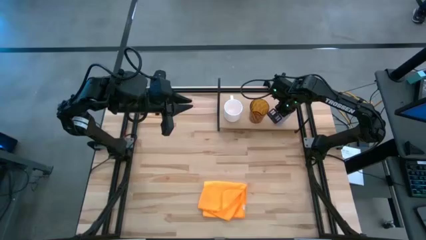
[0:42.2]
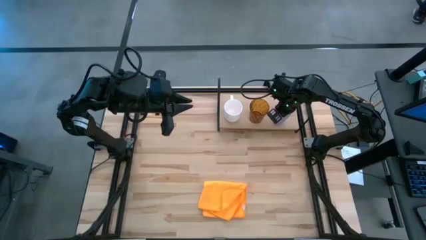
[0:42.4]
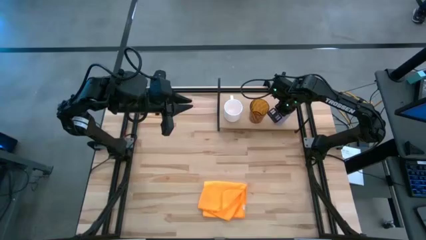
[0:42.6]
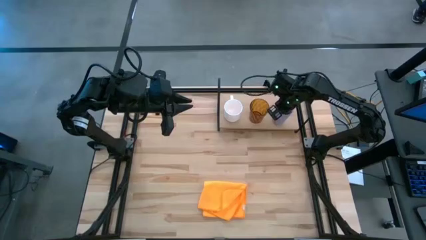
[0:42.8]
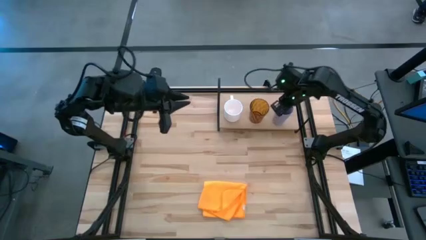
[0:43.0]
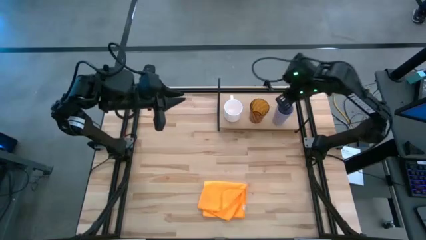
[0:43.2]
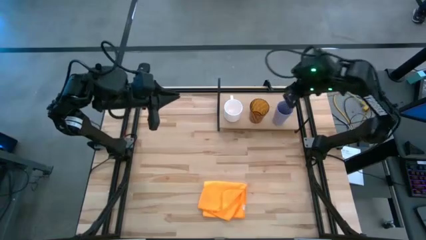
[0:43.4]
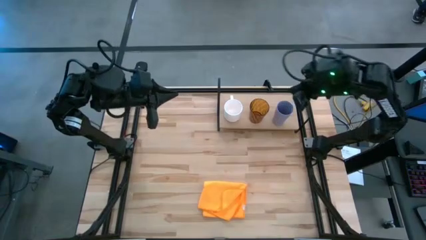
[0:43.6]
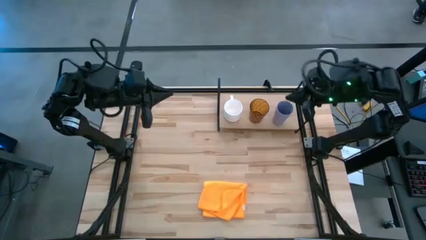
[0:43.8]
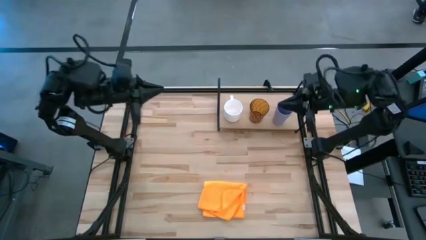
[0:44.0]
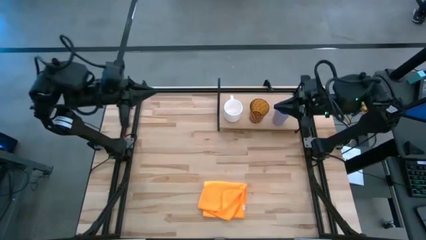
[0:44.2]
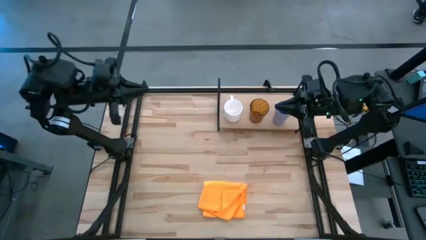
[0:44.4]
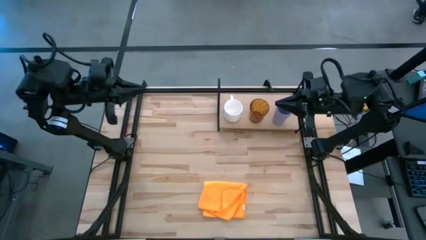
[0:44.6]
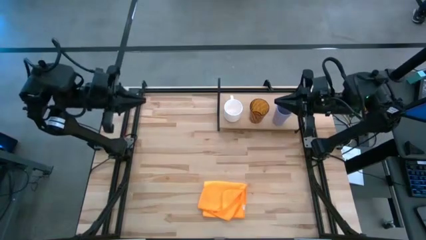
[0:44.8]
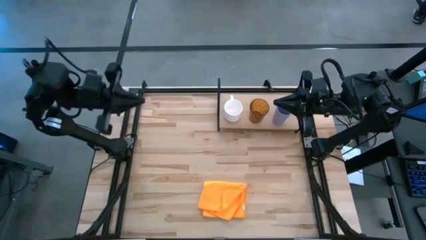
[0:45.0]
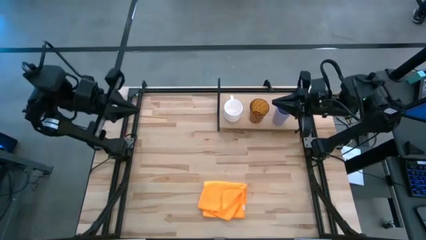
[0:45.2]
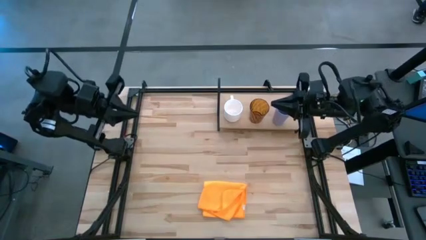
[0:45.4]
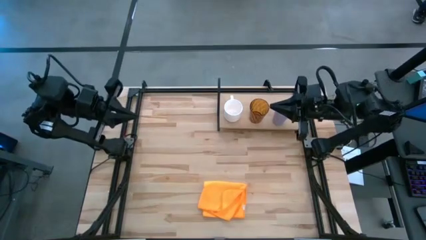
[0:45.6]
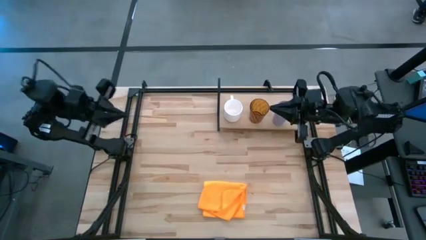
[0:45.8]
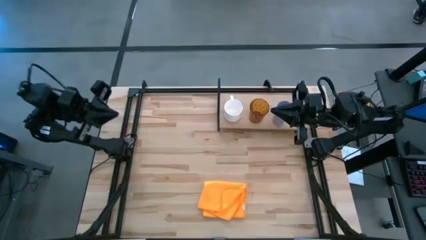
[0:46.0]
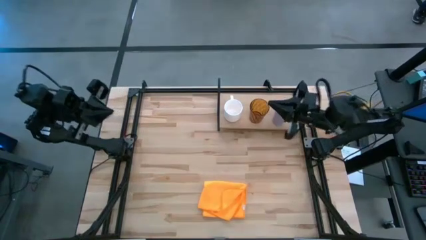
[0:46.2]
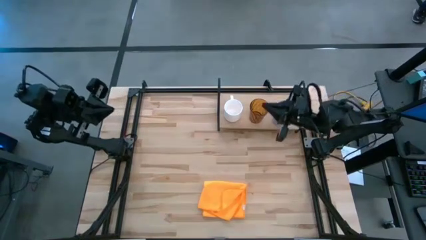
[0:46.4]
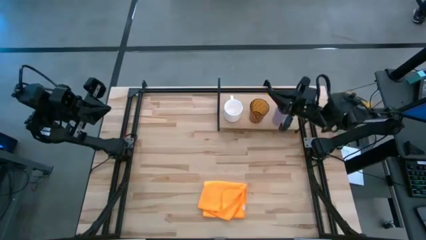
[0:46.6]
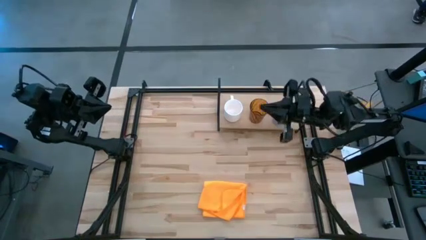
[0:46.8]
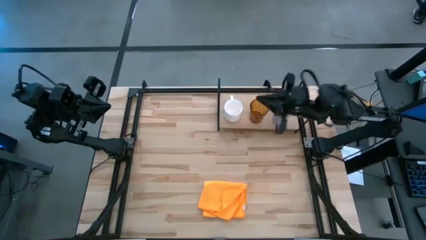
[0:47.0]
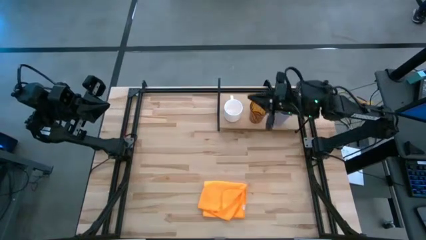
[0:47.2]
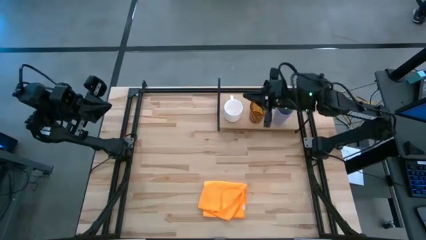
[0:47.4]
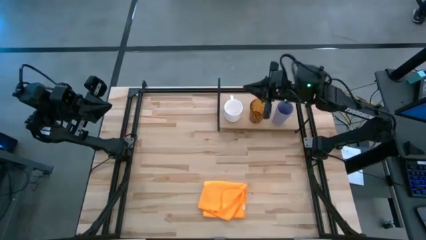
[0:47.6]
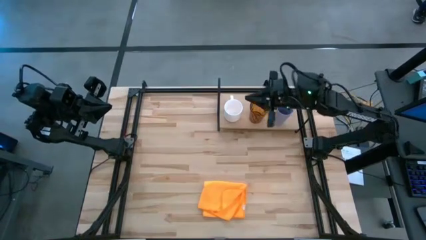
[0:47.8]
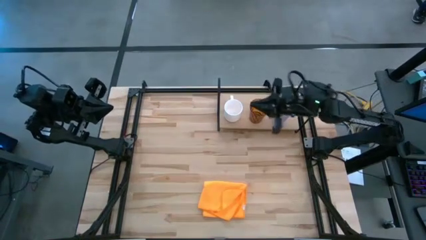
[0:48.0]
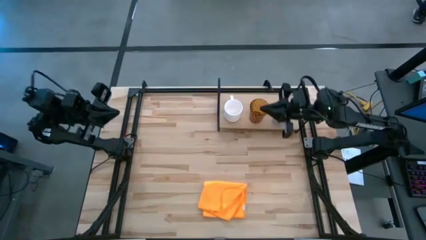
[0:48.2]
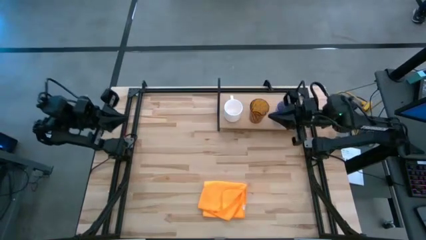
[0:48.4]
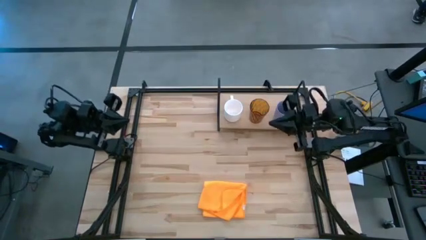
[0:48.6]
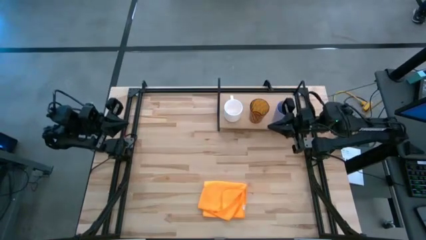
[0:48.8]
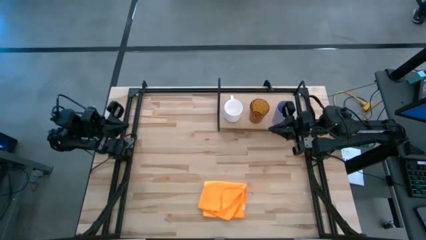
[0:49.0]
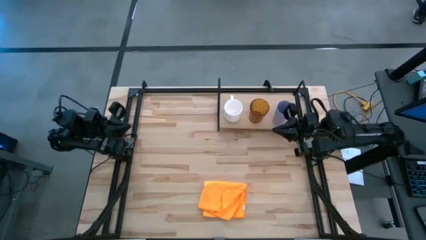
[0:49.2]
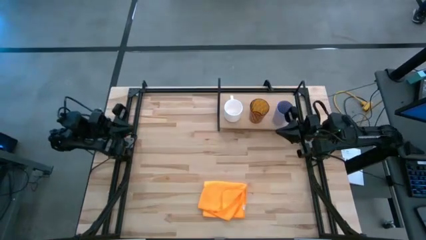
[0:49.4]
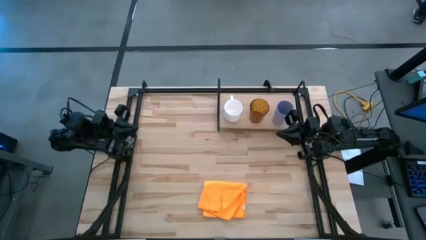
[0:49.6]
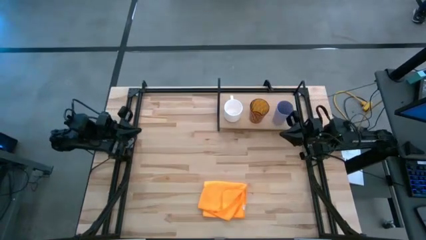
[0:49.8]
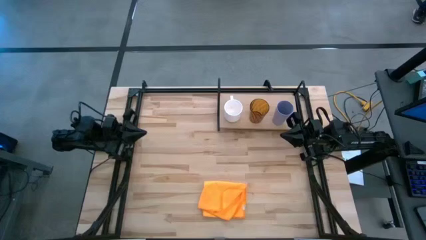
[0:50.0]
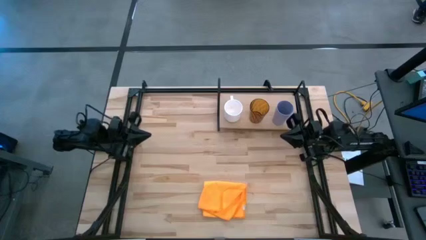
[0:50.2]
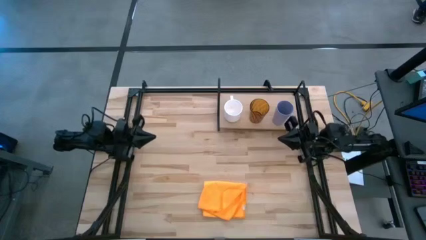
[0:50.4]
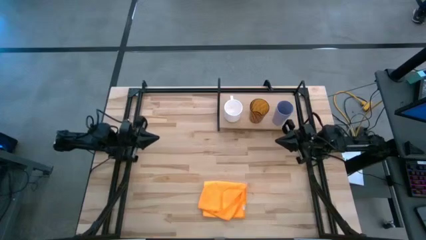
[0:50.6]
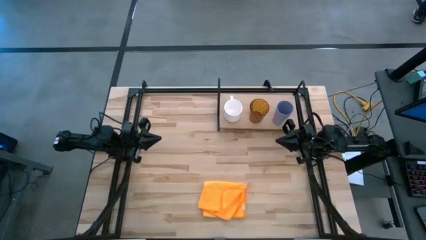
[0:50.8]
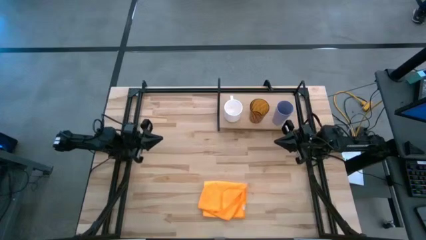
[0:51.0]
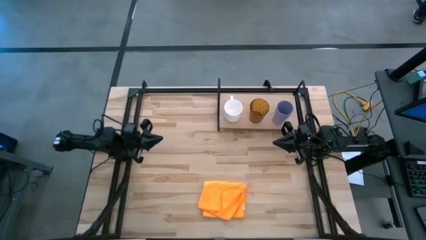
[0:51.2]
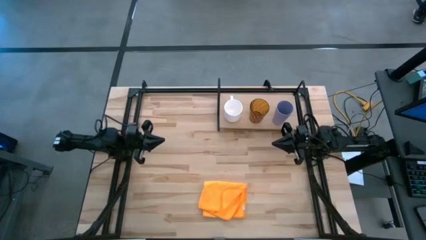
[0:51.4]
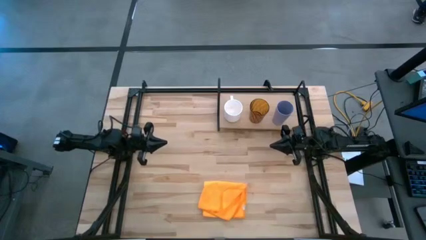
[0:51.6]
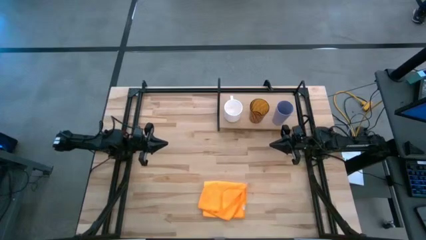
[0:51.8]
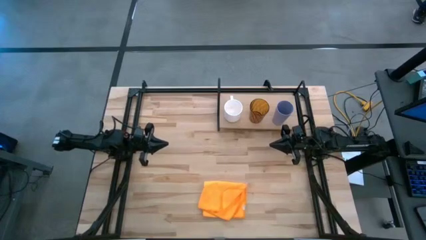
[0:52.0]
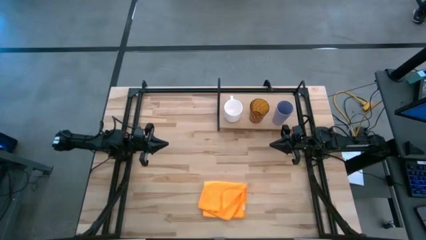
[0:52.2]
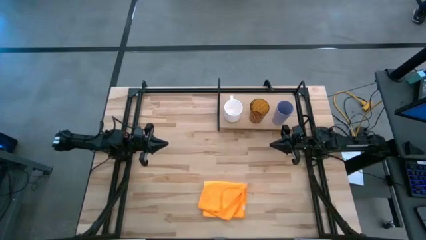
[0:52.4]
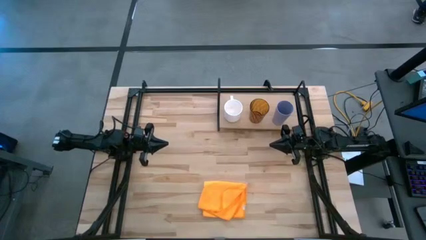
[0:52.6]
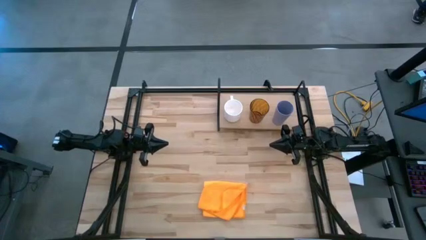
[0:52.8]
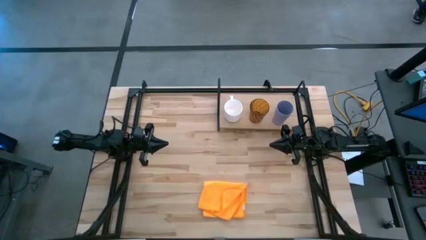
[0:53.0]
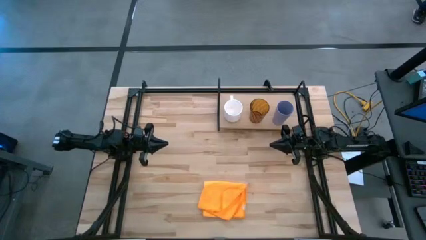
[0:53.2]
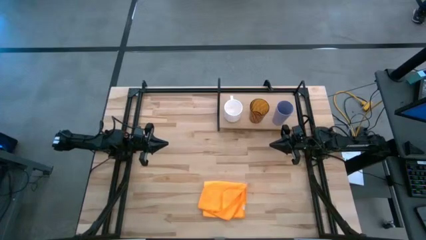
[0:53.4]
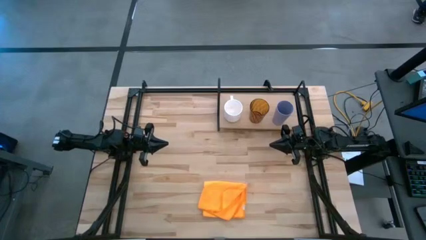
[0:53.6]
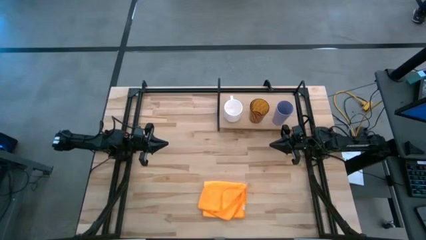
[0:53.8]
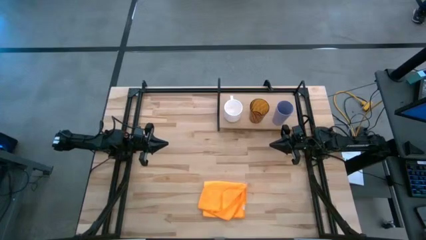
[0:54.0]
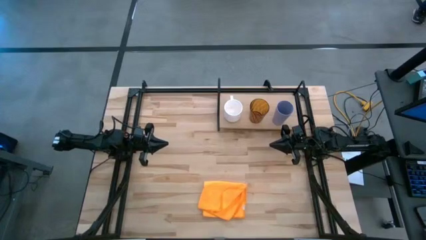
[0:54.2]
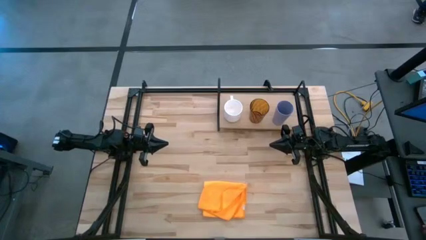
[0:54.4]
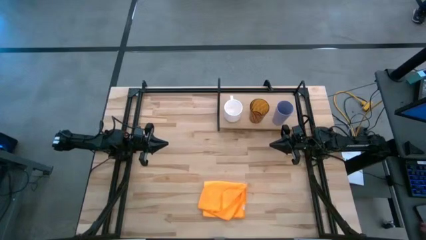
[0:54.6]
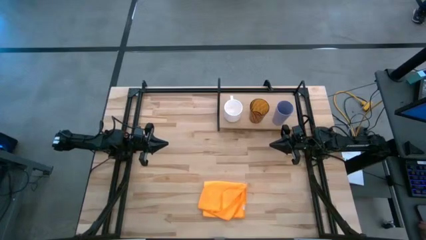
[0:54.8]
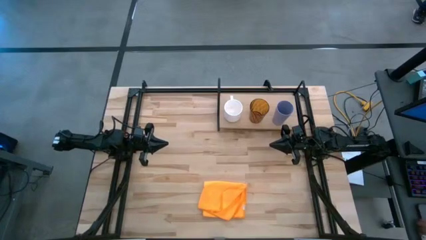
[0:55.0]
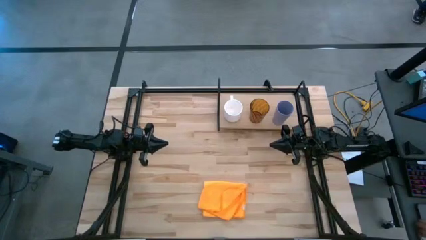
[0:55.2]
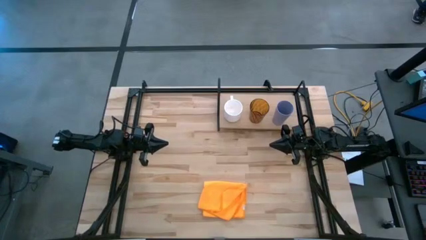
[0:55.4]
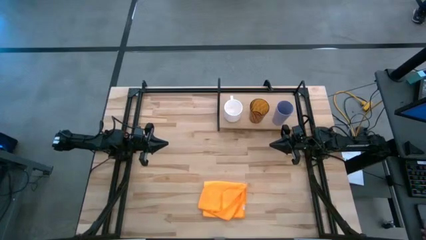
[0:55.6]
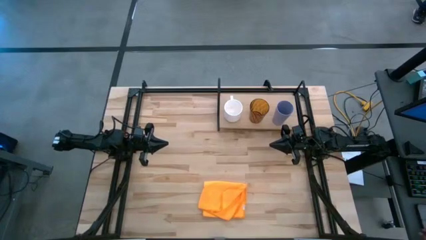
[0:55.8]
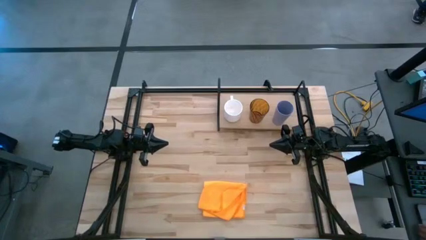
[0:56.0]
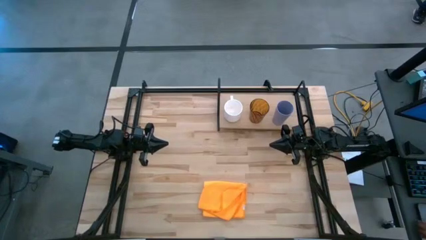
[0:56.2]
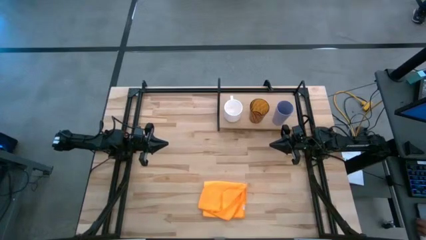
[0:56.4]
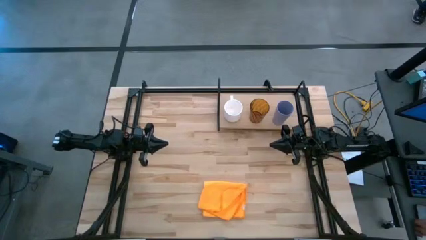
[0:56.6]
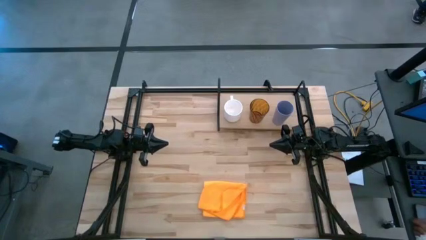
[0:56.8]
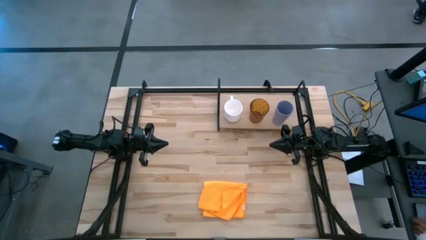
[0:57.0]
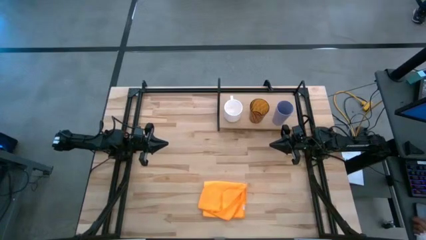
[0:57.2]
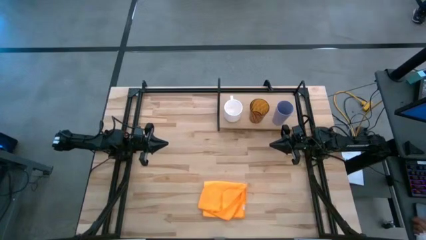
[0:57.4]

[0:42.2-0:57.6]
Task: Stack small to large cups/mugs on shelf
Return to Home Position

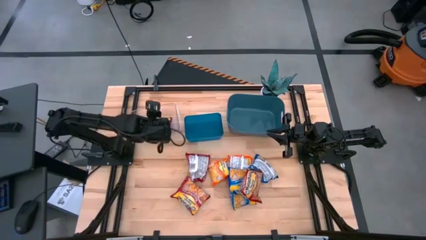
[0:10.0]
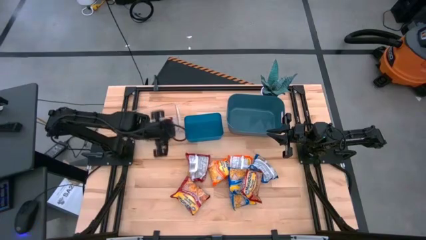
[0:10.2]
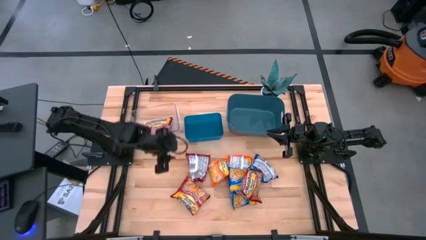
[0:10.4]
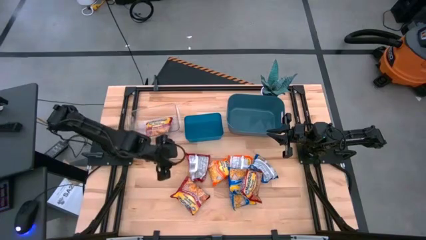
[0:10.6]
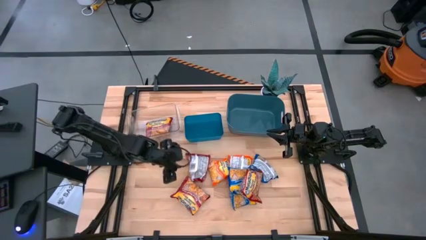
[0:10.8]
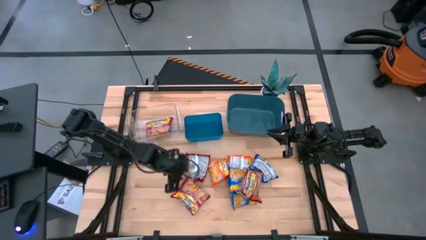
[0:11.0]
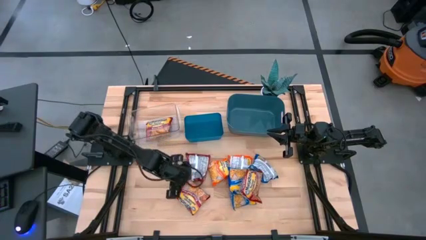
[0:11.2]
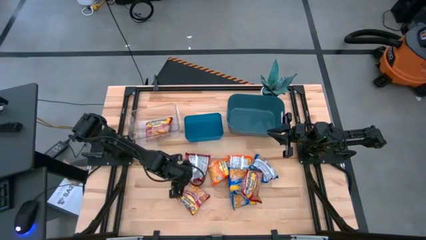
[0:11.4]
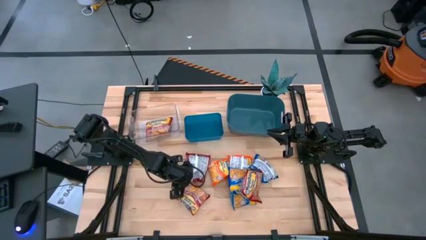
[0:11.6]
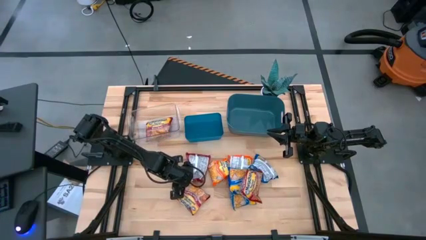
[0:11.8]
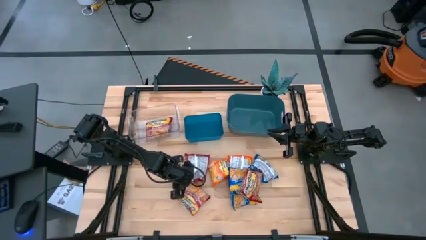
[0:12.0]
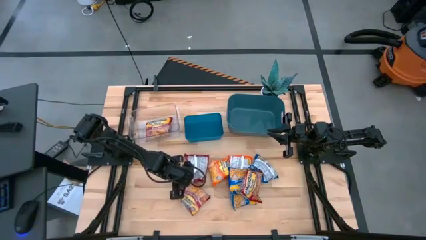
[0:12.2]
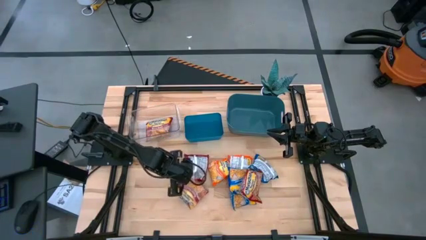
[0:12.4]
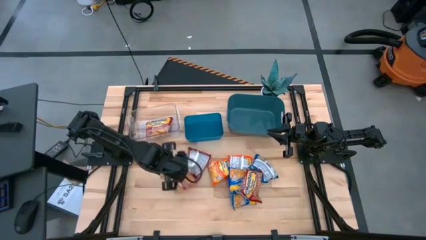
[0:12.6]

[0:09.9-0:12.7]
Task: Sort Maruchan noodles
Put the red noodle pack into the transparent bin
